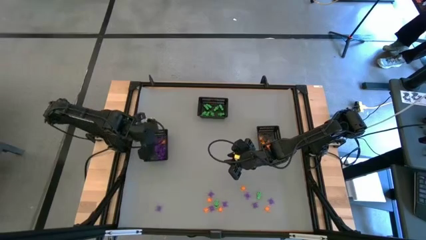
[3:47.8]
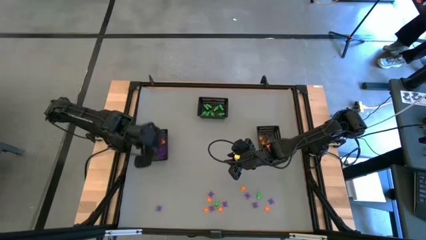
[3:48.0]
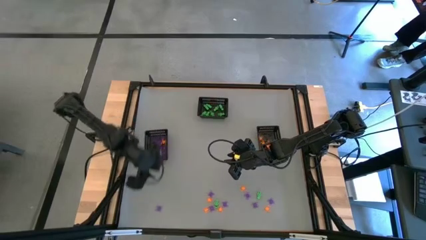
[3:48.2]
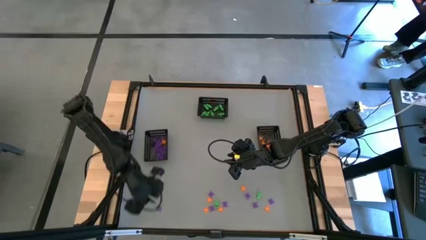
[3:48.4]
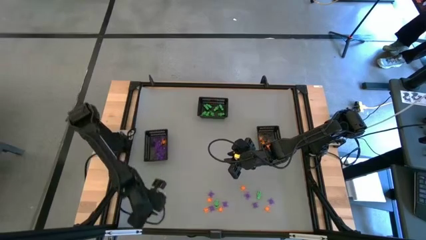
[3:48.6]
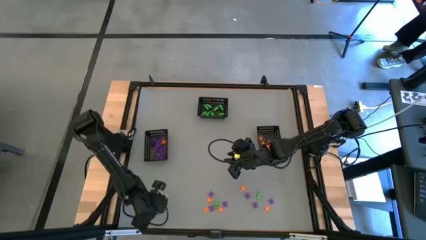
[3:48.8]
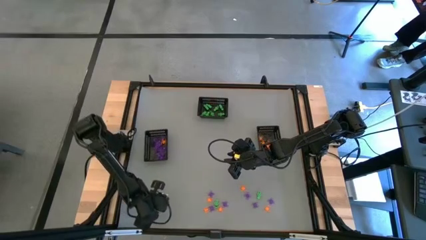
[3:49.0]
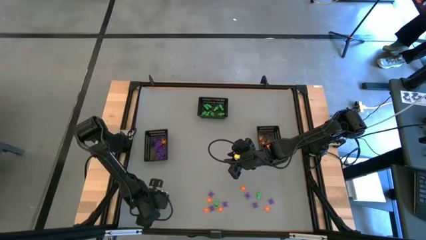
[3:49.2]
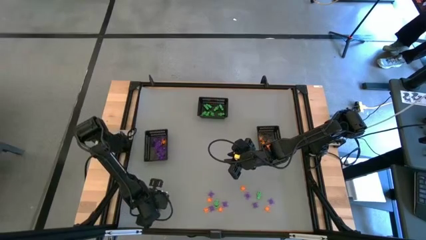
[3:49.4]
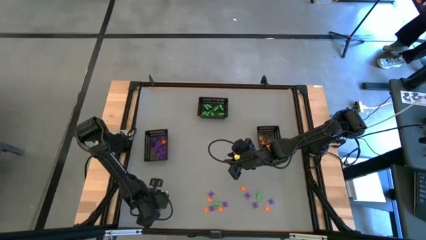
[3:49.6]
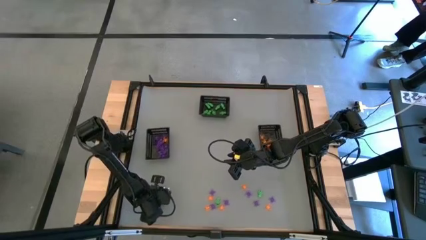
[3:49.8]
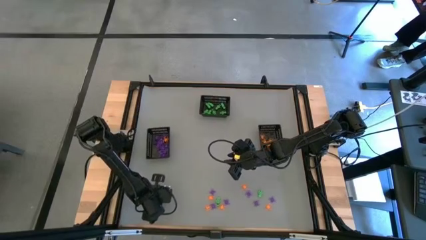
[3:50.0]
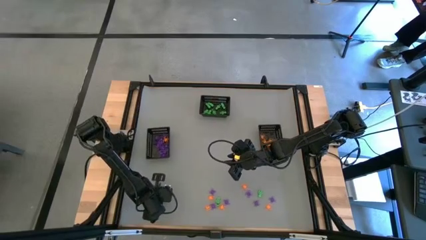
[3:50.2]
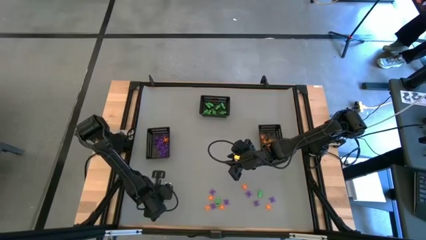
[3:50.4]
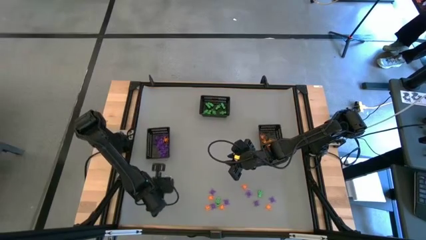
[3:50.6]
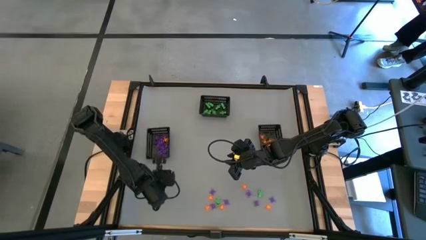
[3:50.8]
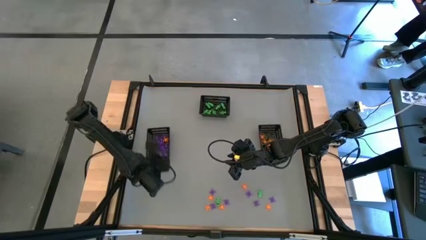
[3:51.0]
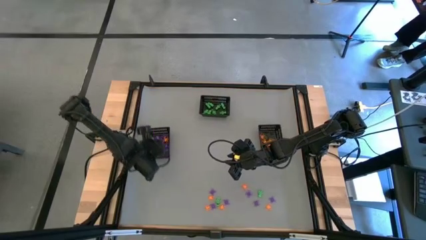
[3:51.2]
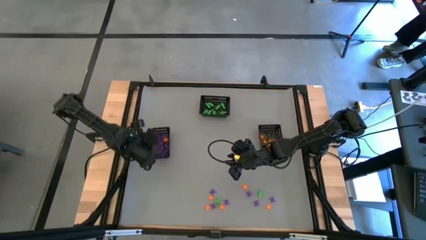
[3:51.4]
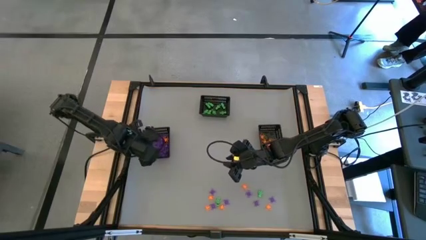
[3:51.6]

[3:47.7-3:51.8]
Task: Sort Halloween decoration
Put the violet spider toy into the left bin

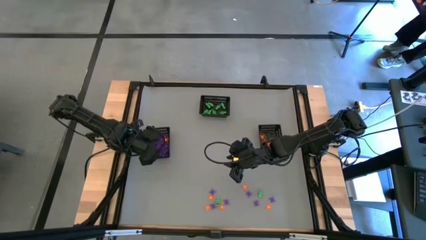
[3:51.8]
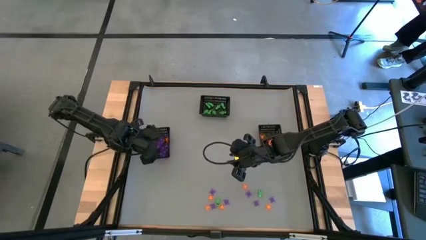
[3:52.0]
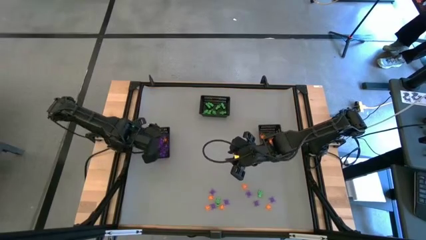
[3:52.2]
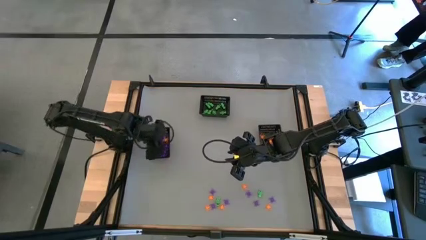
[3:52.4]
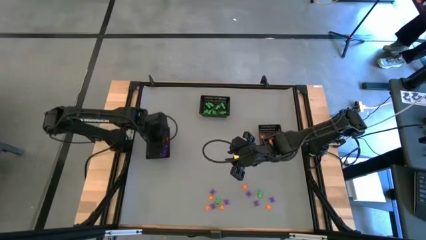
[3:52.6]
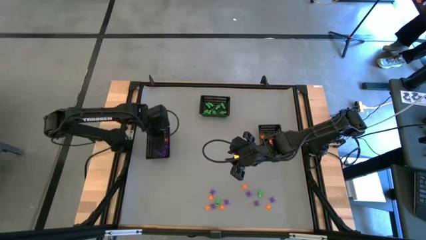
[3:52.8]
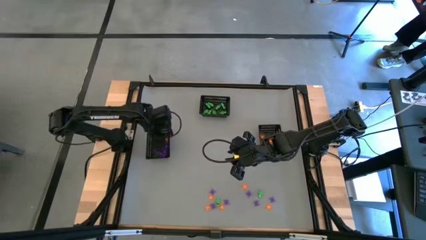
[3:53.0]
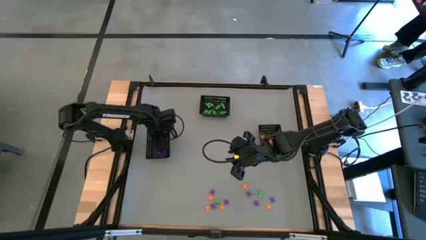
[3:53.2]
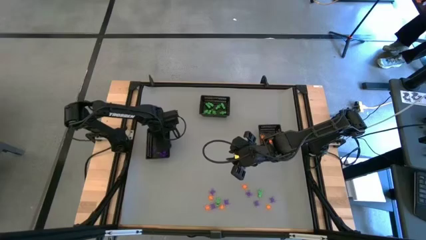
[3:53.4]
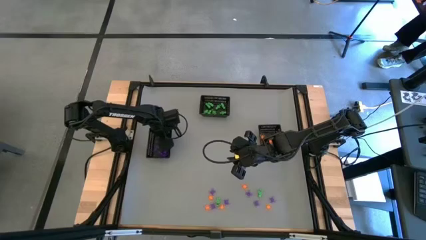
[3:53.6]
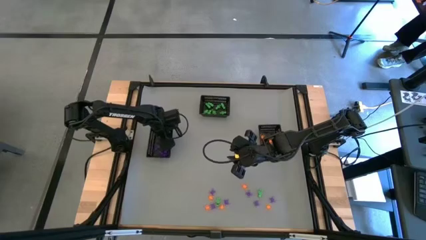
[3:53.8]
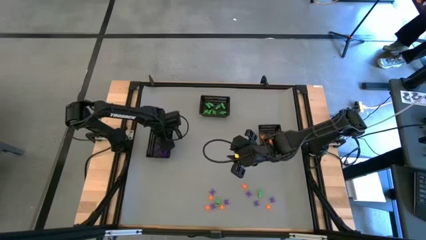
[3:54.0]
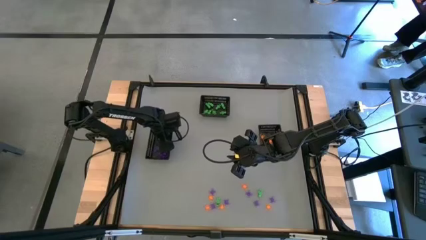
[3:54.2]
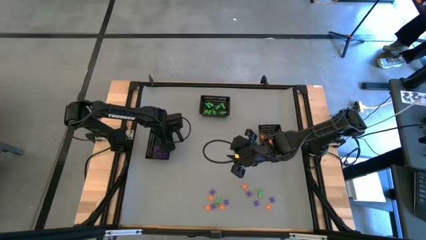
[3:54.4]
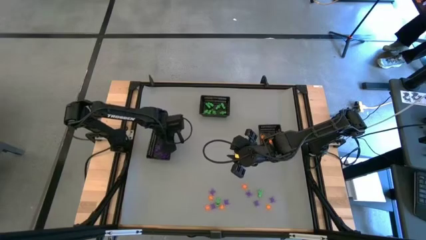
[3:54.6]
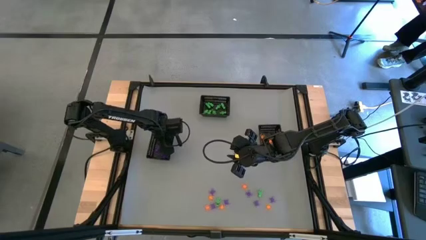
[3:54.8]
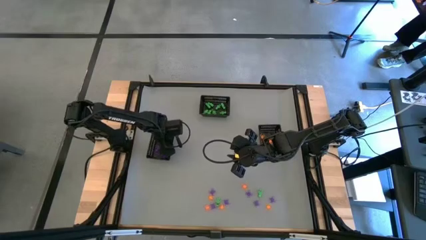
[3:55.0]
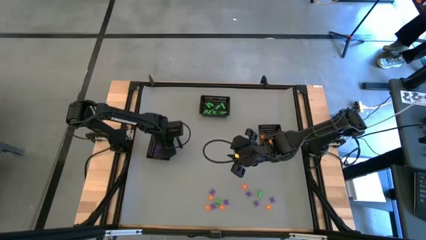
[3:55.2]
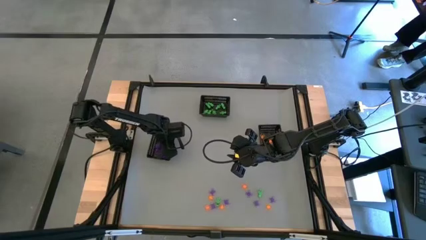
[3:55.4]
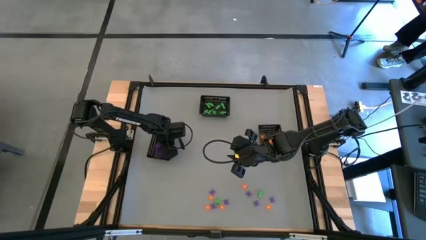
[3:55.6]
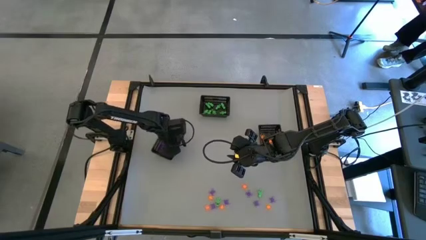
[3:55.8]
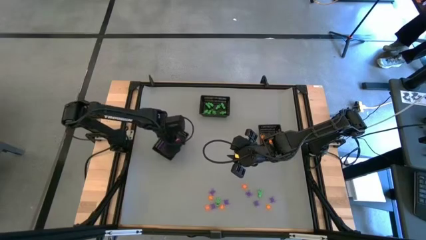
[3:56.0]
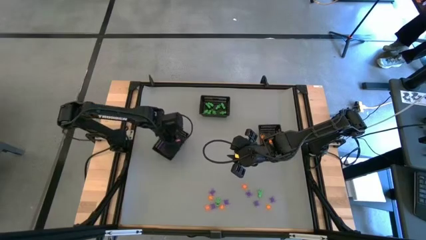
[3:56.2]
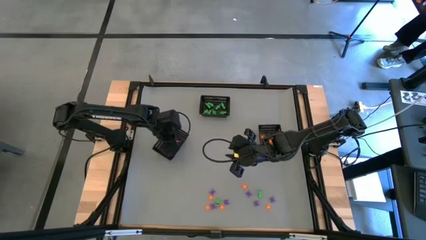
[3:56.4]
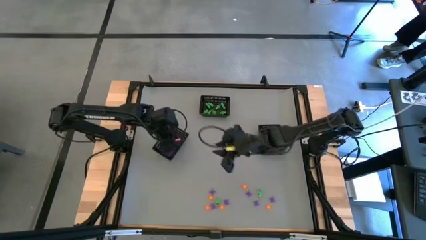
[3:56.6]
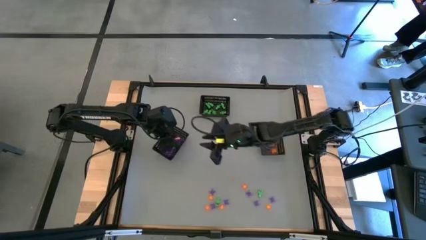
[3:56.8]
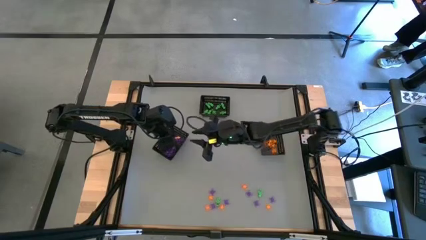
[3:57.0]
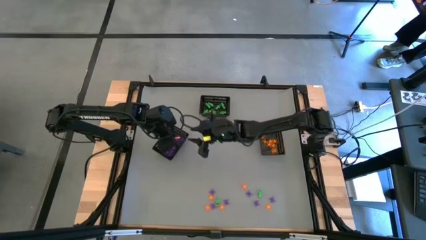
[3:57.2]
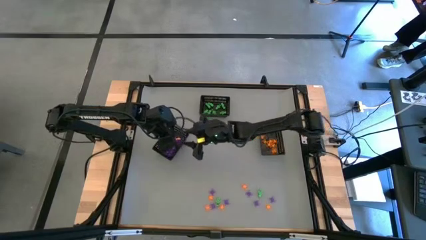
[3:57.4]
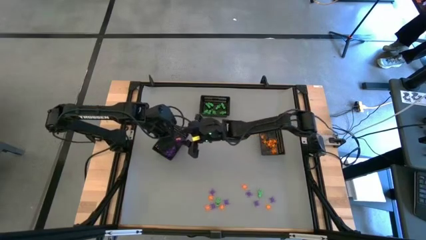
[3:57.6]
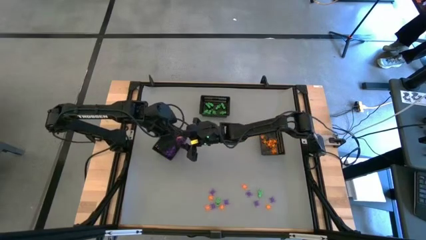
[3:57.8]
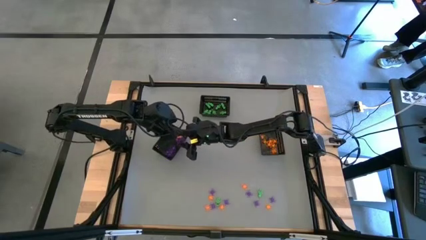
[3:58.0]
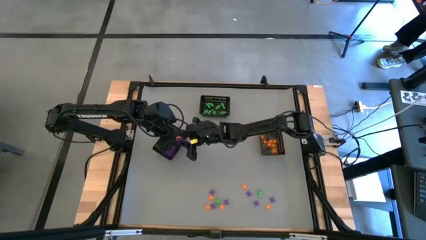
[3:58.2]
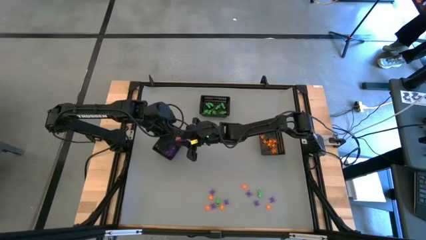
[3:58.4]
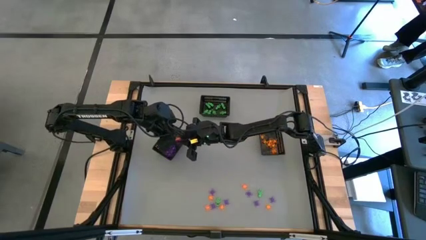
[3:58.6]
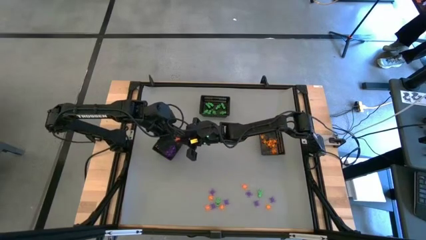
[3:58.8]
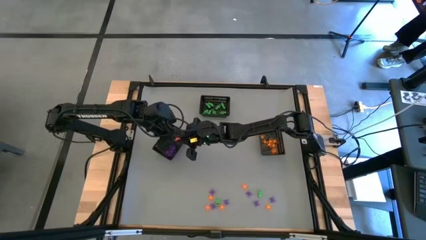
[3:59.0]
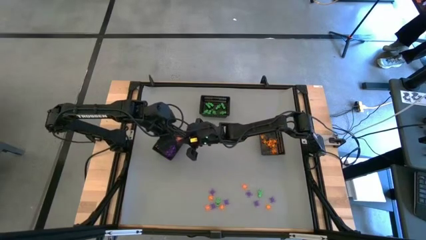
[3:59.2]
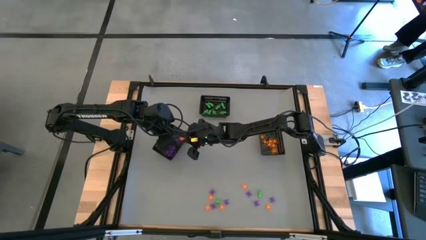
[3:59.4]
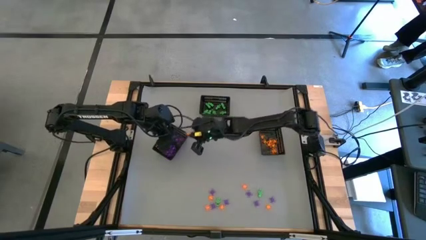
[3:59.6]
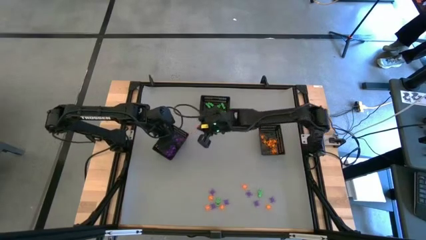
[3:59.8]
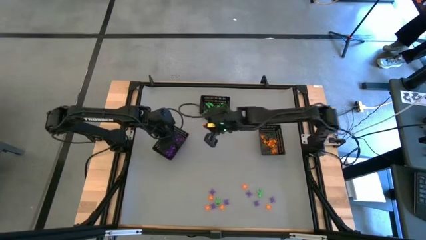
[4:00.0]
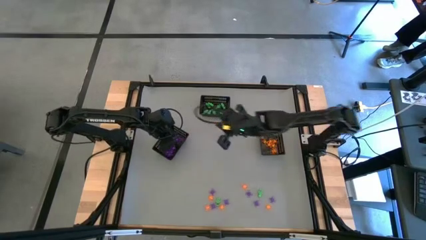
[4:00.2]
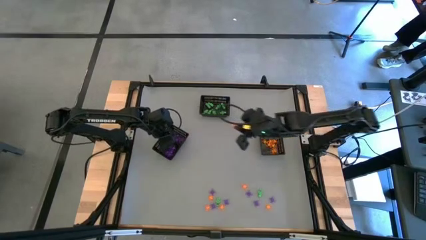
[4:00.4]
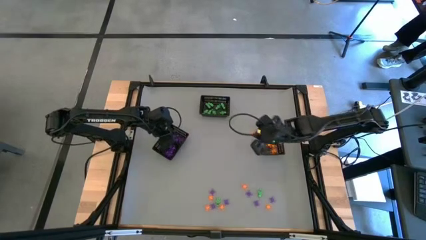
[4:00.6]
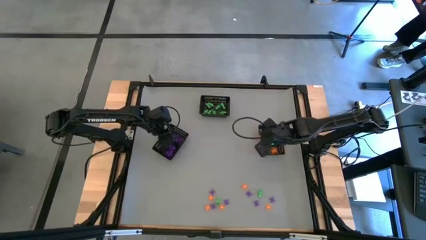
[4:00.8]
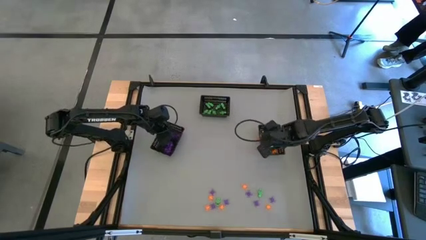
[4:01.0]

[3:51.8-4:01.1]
Put the orange spider toy from the left bin into the right bin

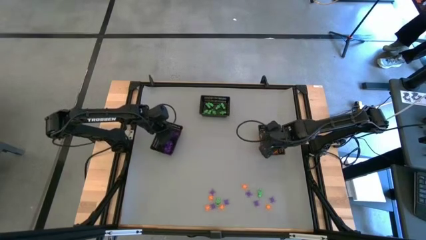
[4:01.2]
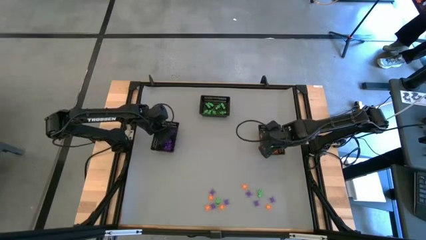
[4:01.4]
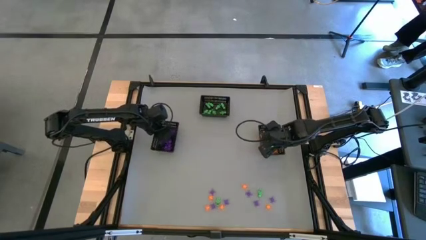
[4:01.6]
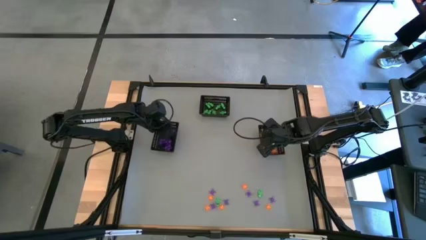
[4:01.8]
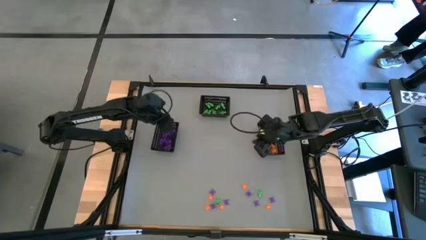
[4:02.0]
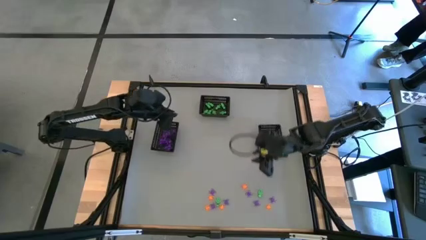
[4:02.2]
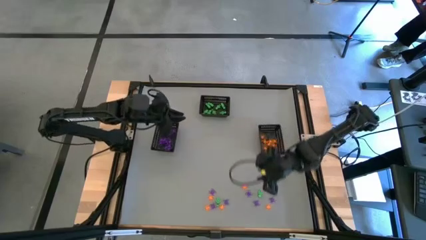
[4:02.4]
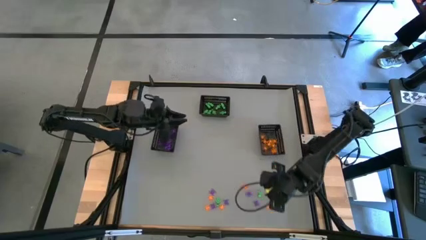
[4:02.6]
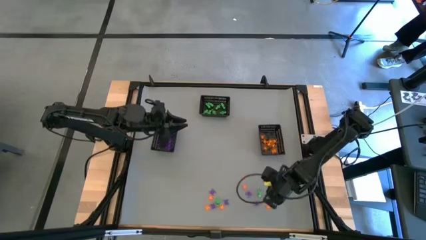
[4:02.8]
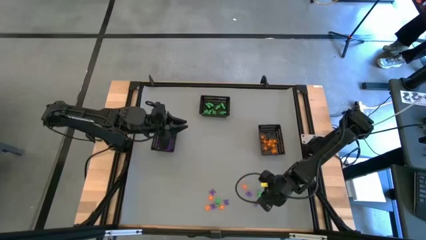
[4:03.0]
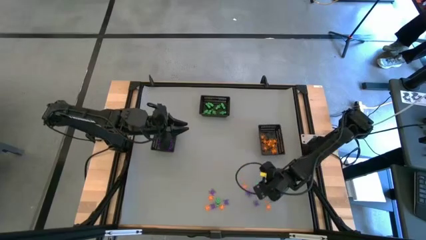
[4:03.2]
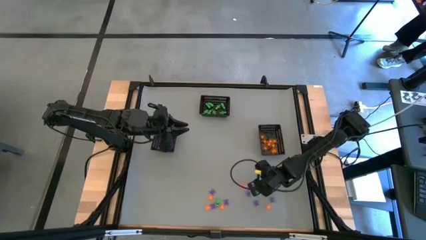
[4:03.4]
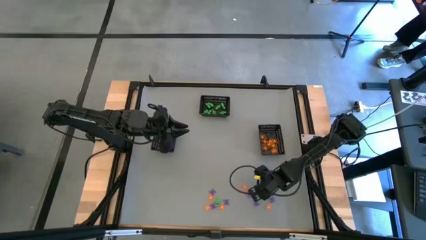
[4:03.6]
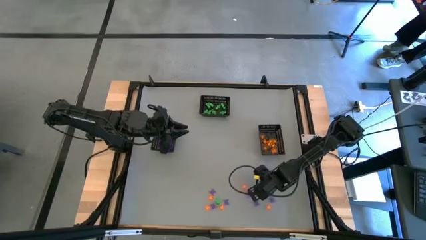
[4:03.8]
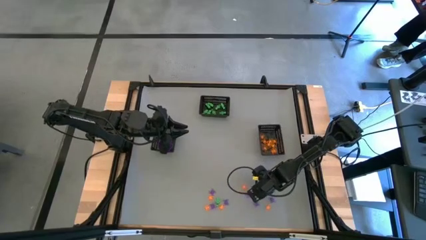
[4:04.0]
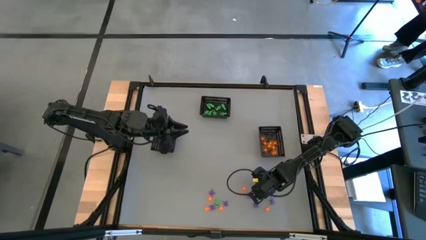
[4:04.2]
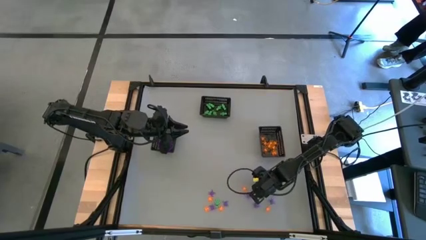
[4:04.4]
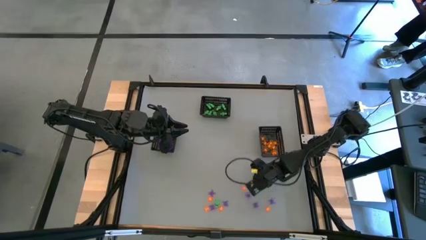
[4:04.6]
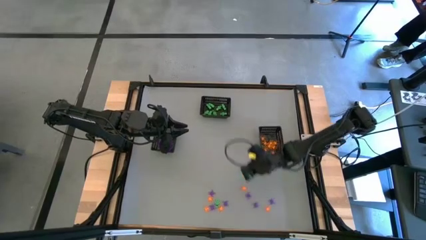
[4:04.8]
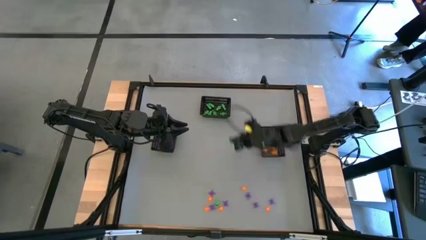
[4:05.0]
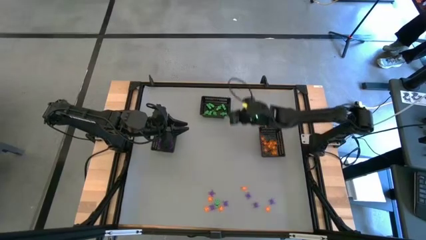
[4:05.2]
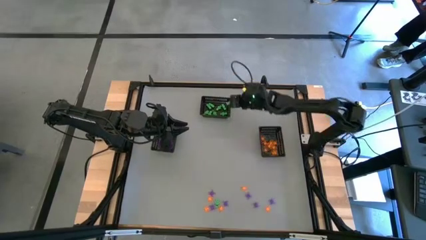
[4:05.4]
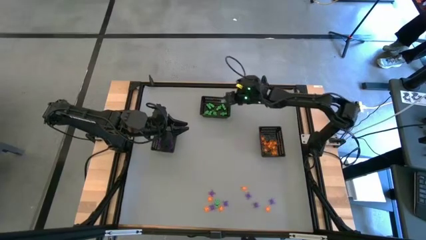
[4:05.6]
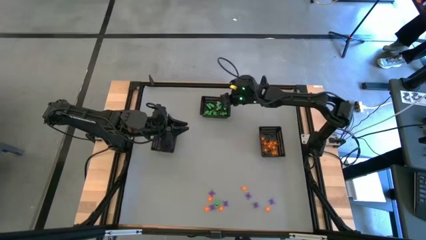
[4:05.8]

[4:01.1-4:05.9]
Put the right green skeleton toy into the top bin
